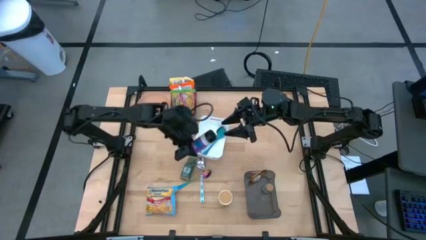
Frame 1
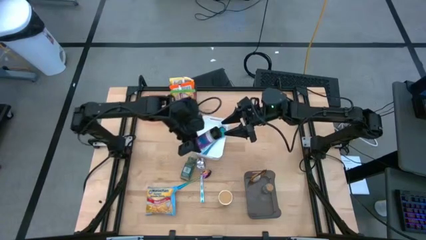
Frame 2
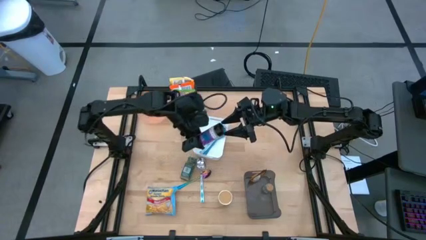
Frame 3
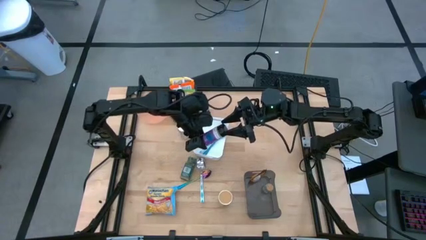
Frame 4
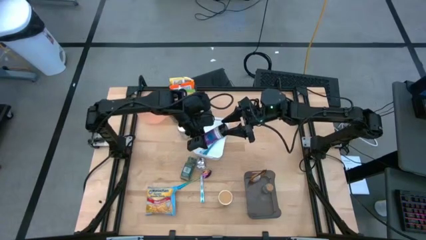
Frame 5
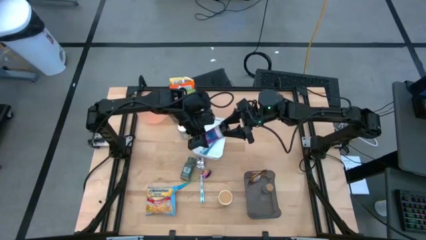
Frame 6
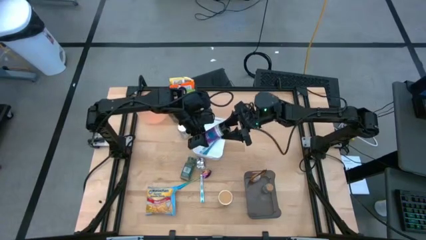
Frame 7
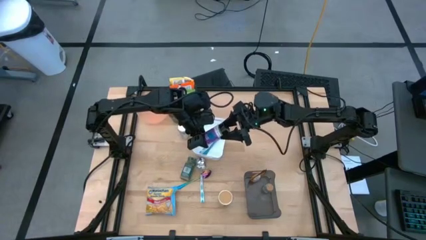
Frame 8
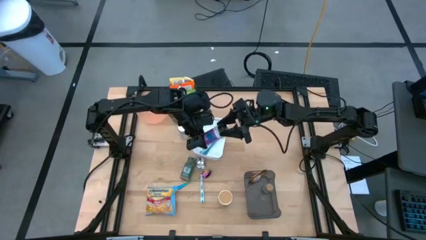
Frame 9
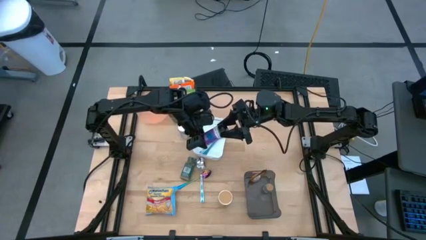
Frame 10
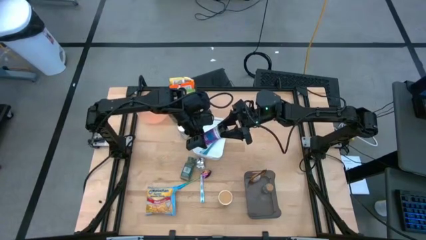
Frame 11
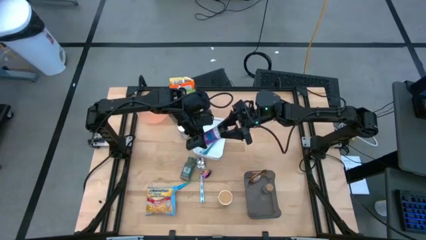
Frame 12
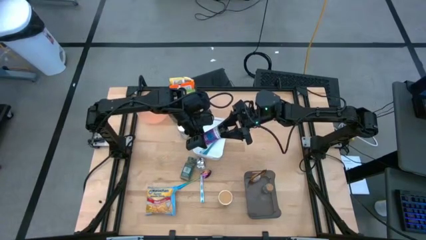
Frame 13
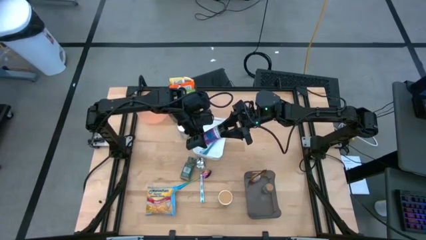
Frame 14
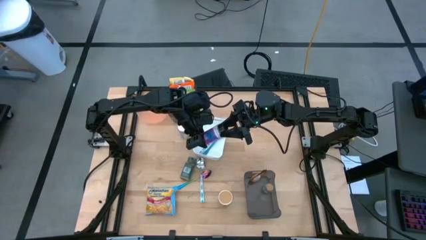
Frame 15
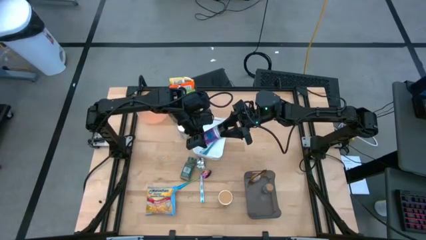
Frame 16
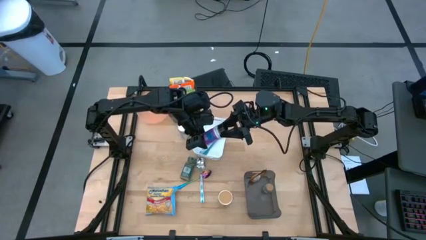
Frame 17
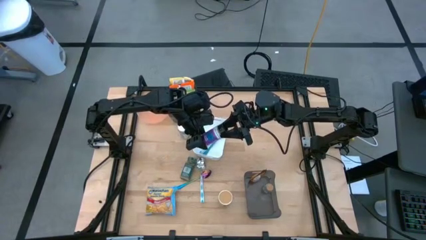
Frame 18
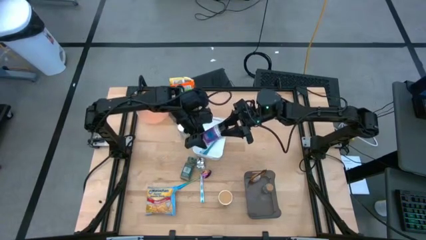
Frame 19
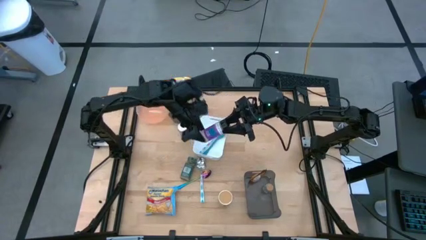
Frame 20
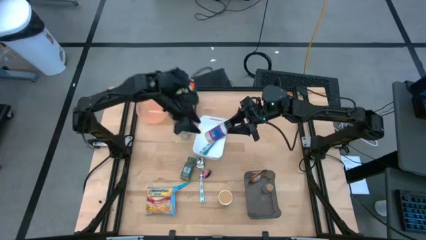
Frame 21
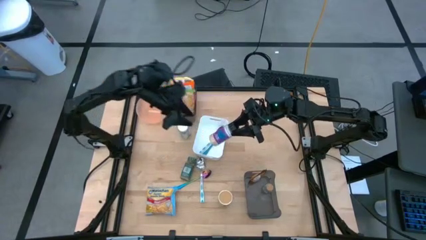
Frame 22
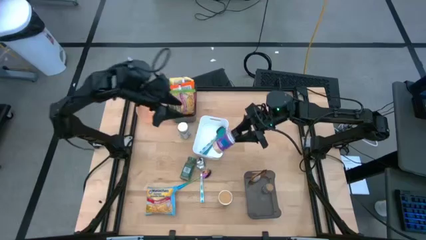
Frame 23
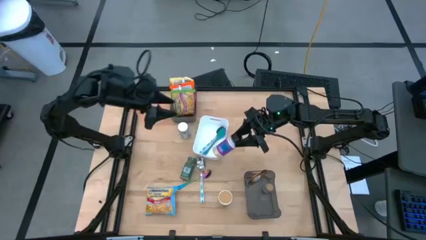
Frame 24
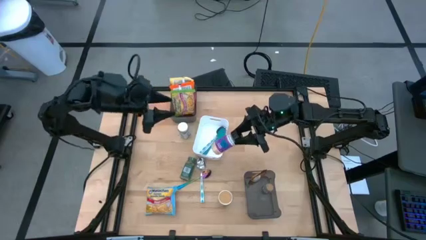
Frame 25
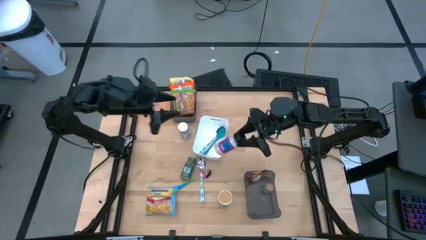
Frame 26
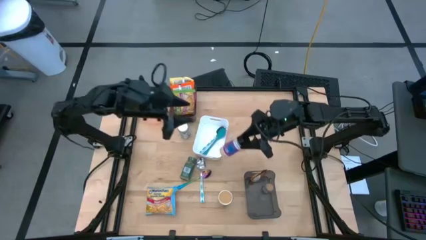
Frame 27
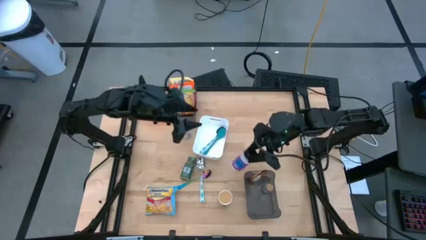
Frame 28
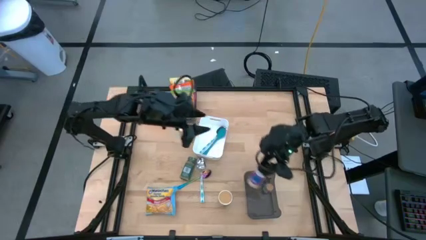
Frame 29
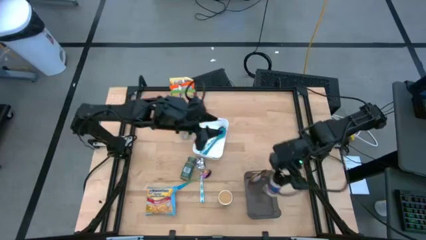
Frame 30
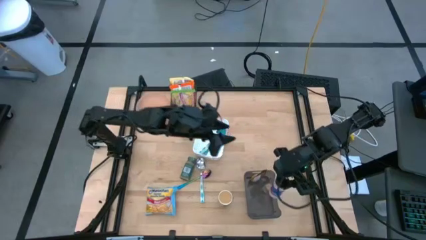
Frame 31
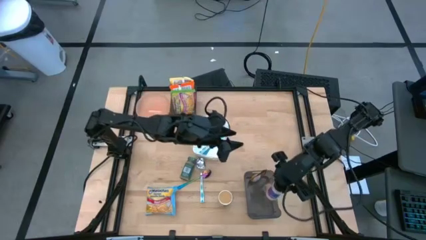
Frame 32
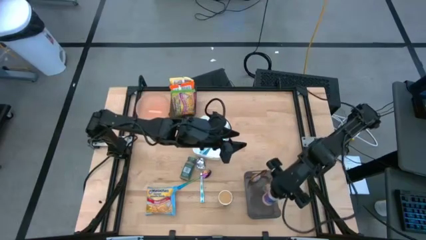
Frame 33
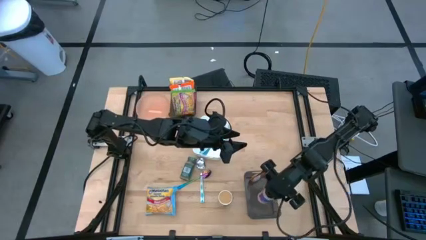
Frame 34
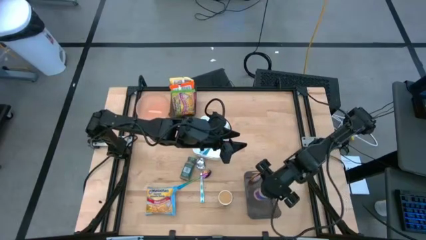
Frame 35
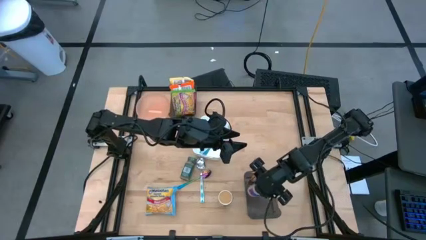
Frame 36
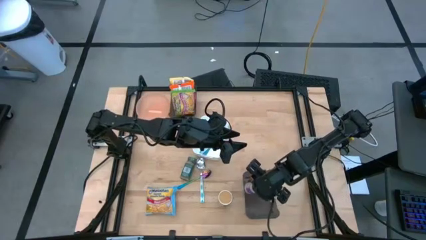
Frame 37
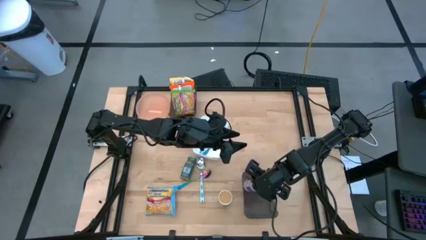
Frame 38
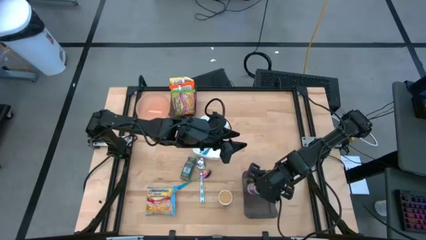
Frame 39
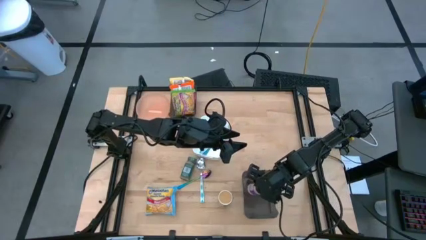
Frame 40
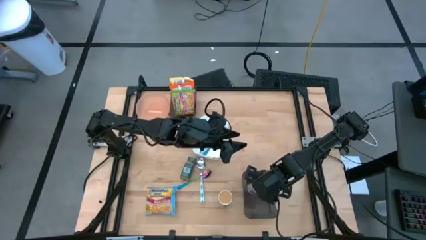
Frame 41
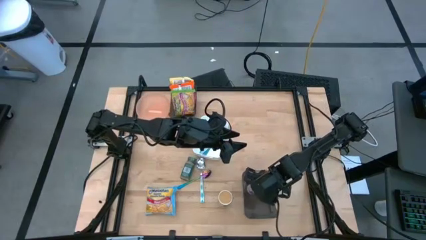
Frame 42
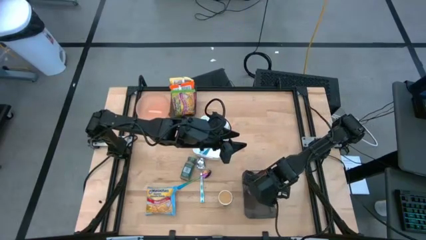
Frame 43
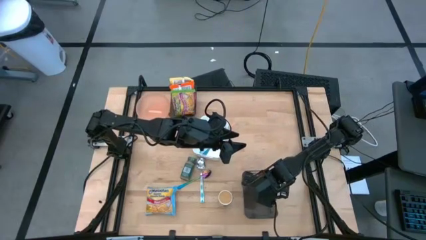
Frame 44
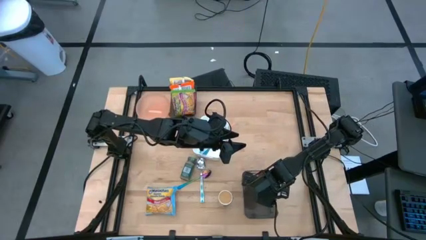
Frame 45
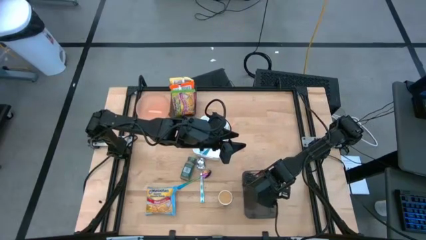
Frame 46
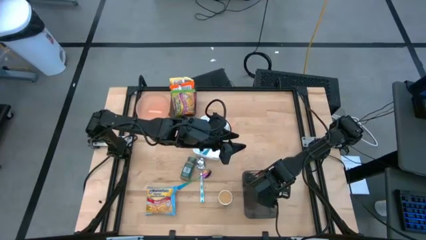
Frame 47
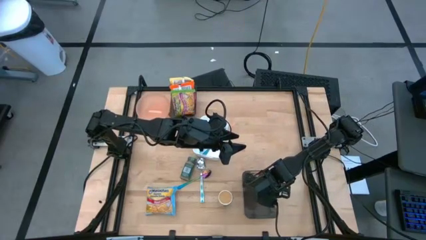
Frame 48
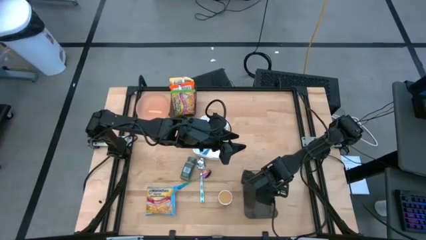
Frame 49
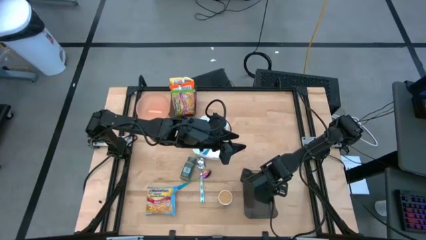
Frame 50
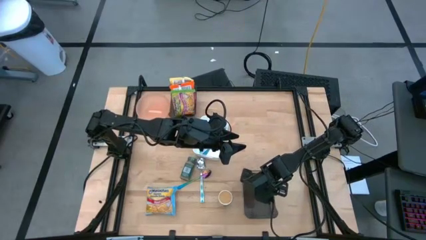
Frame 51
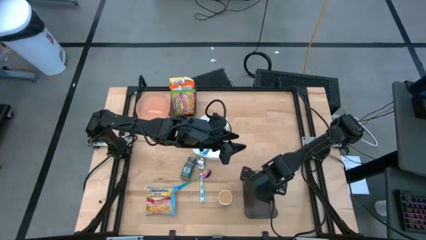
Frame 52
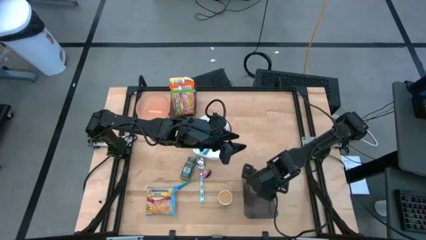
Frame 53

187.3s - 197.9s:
Task: Pick & Place Food Item
Put the black seasoning bottle into the bottom black bin

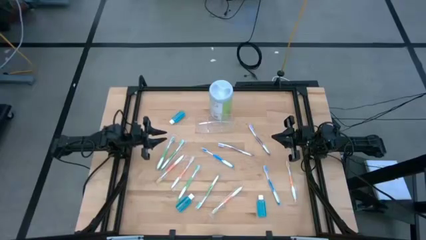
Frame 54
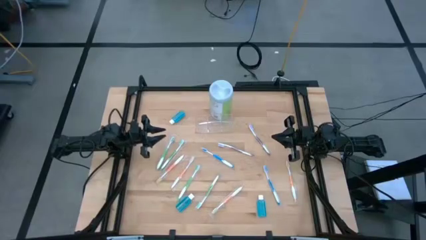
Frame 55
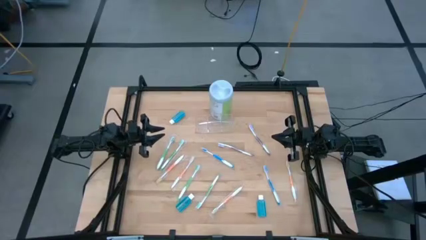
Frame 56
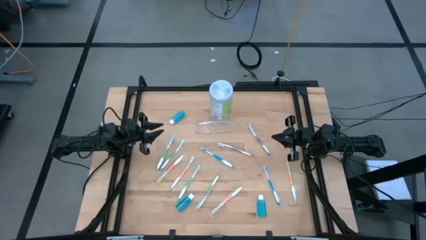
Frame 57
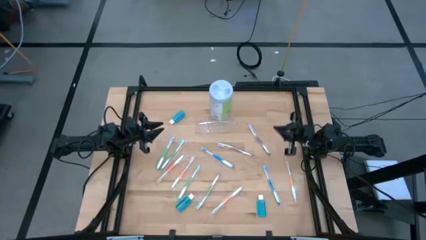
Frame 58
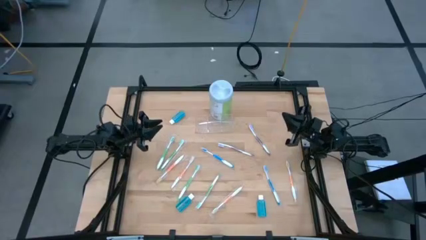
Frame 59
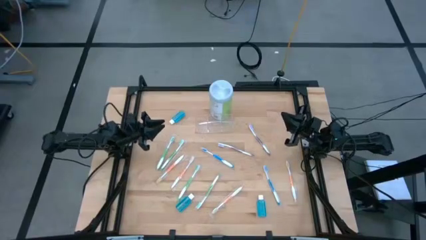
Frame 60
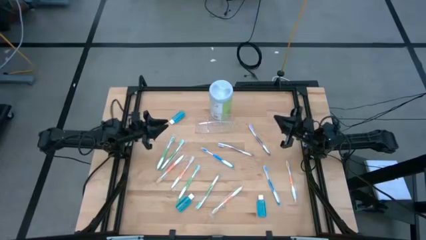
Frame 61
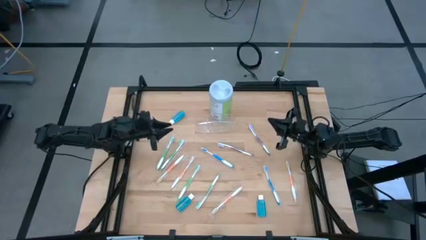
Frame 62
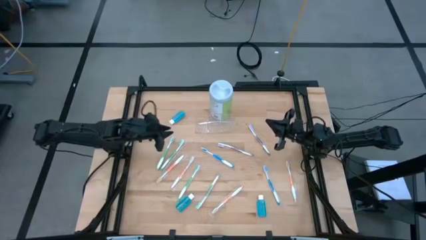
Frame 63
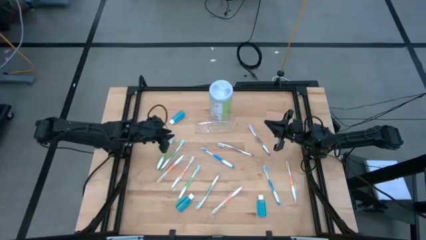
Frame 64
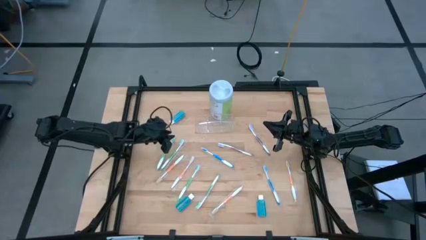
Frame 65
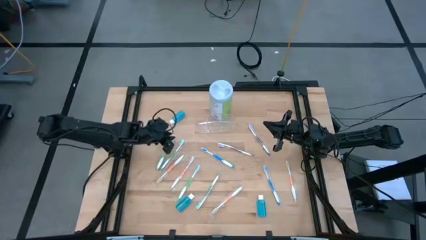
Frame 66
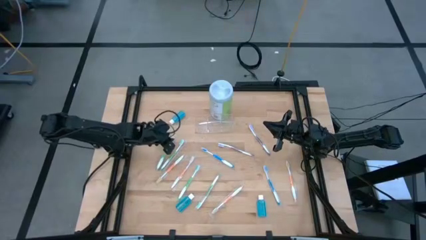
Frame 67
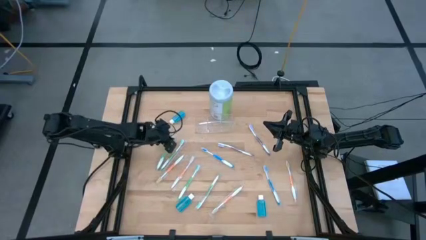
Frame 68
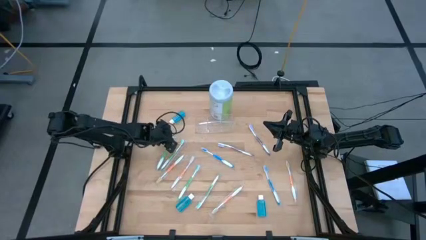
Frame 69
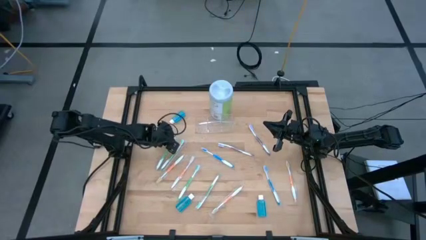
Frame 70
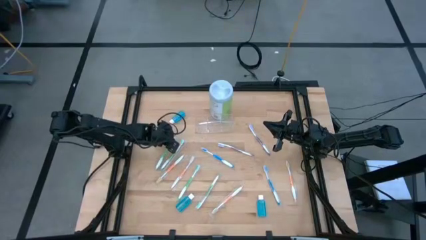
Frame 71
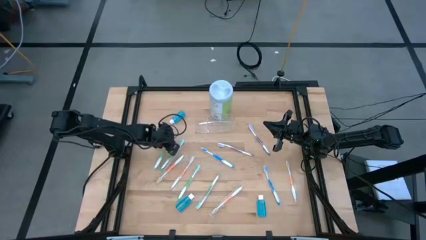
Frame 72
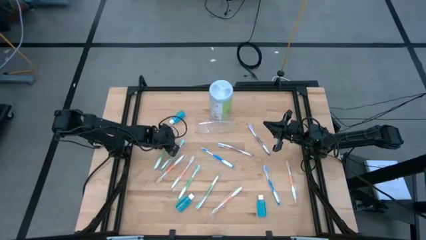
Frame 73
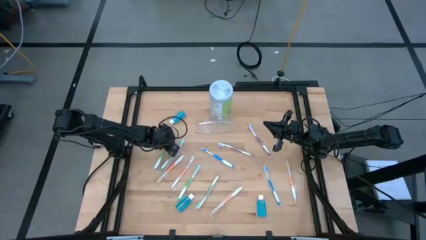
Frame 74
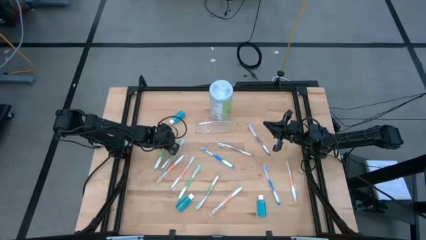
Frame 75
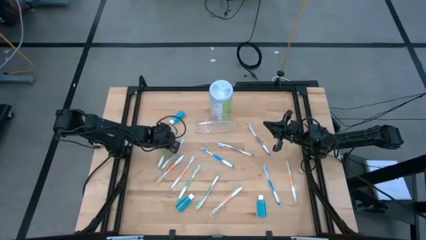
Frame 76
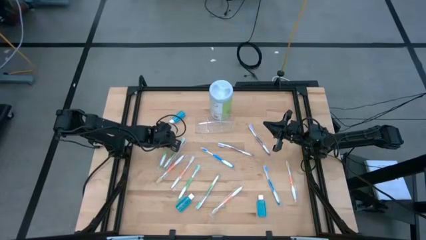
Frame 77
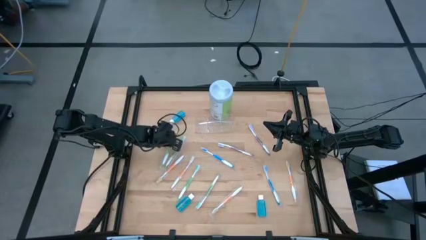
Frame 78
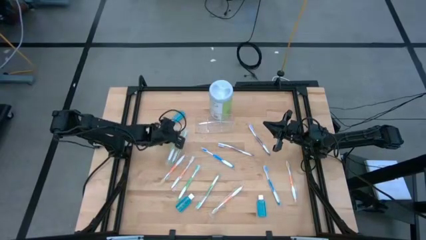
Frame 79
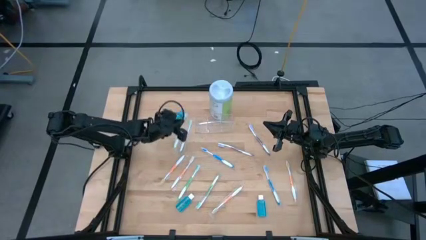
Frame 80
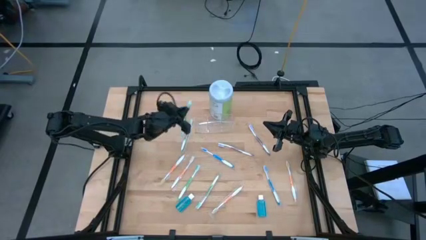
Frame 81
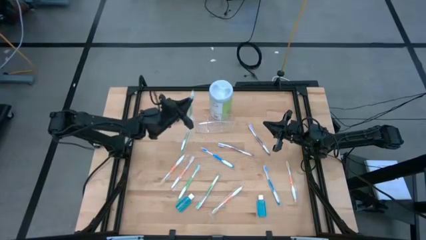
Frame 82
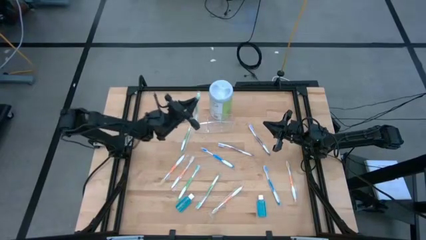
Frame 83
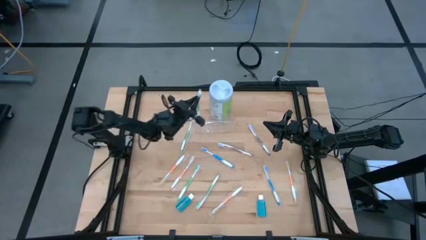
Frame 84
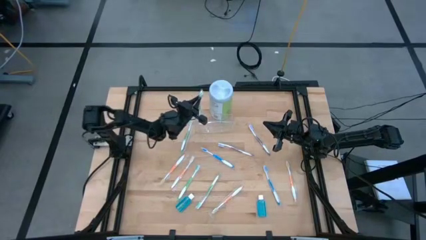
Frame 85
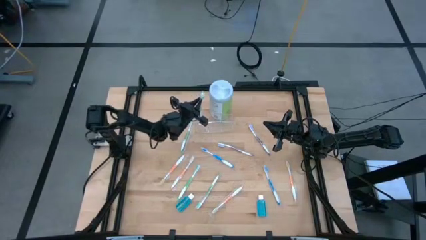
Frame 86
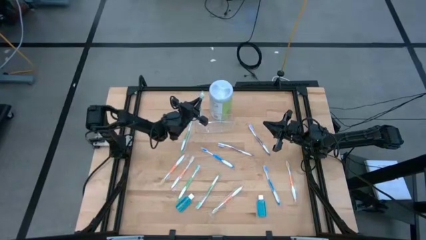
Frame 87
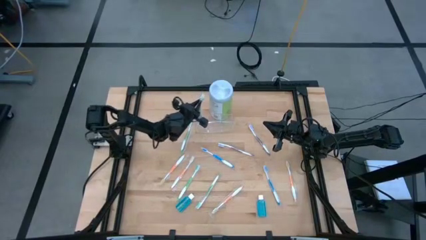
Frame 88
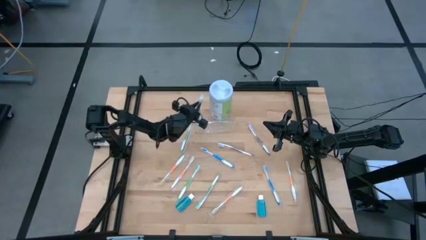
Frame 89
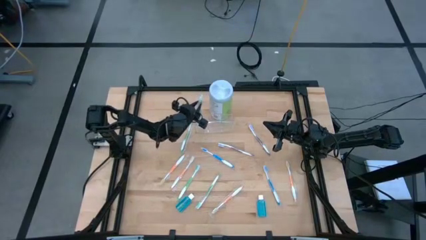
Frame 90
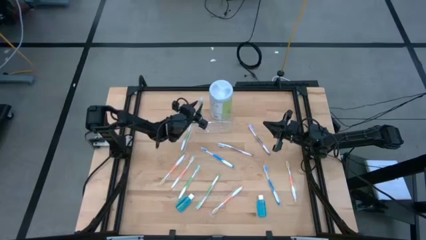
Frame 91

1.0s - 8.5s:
Task: Pick & Place toothbrushing station
Put the green toothbrush into the transparent organizer
